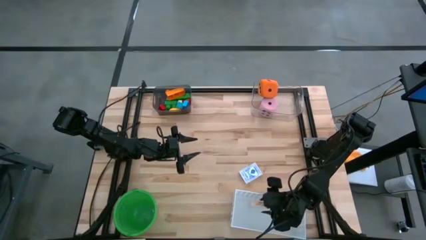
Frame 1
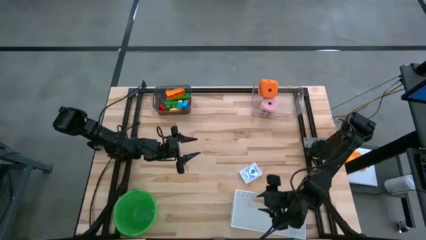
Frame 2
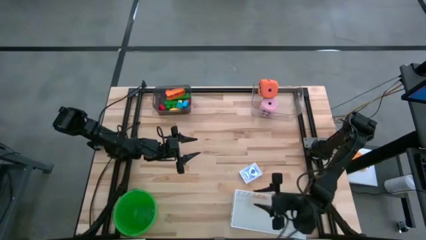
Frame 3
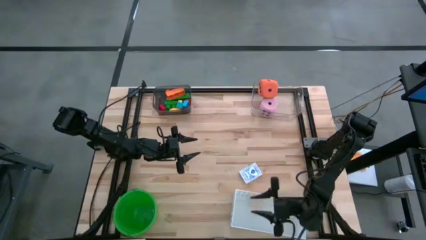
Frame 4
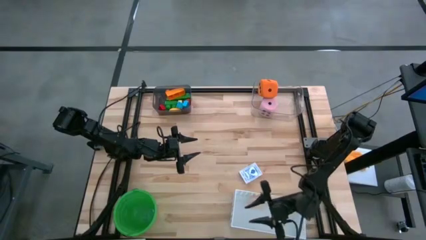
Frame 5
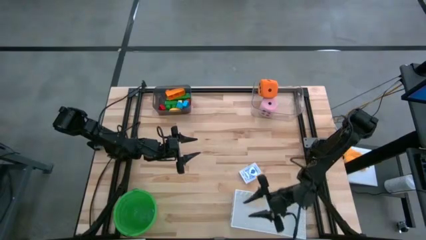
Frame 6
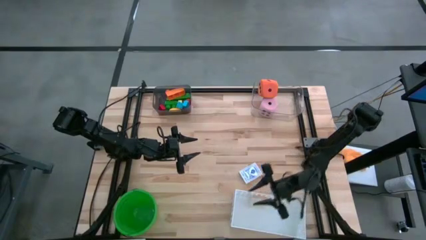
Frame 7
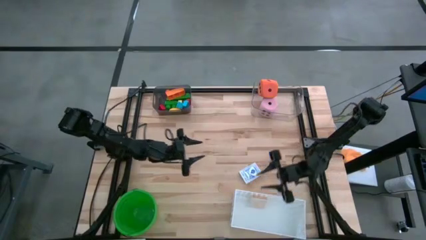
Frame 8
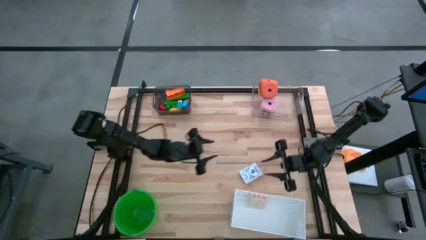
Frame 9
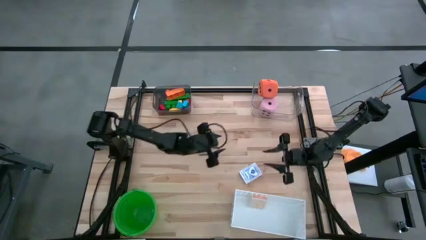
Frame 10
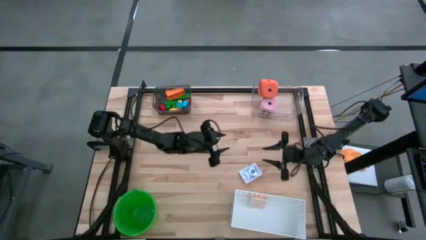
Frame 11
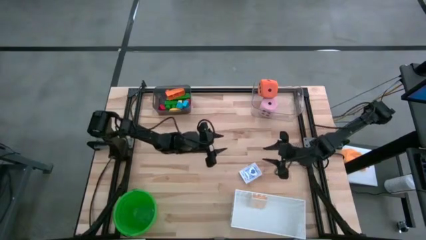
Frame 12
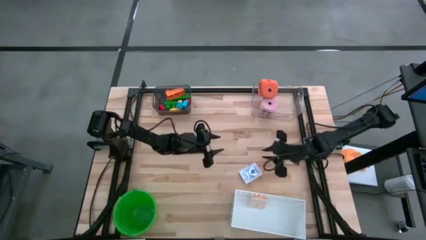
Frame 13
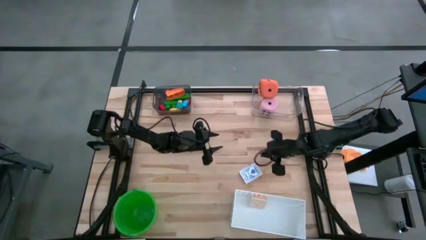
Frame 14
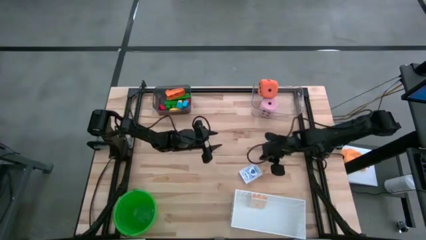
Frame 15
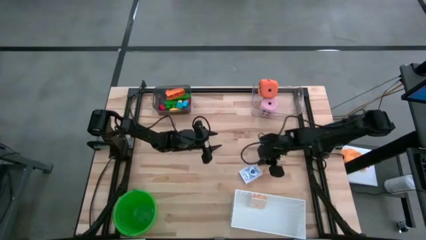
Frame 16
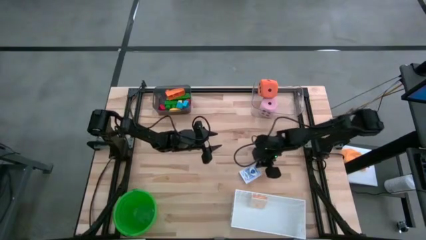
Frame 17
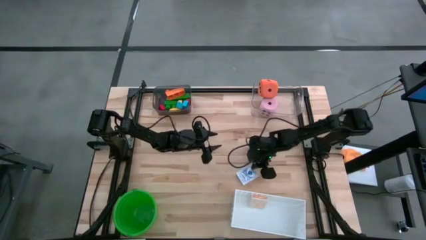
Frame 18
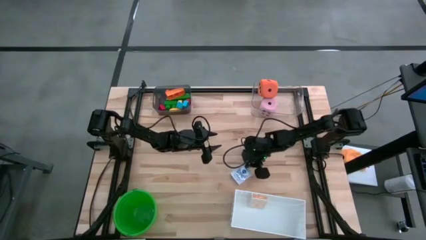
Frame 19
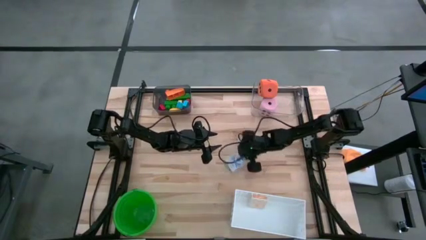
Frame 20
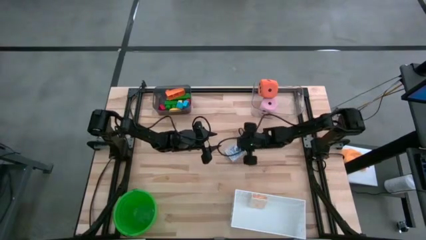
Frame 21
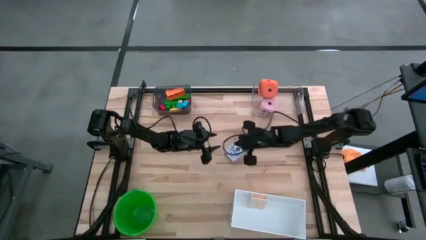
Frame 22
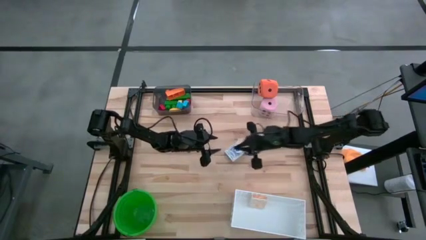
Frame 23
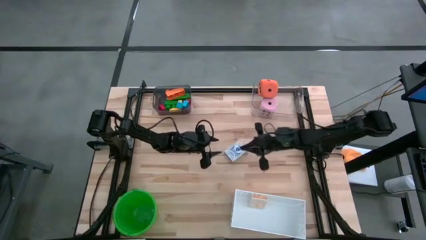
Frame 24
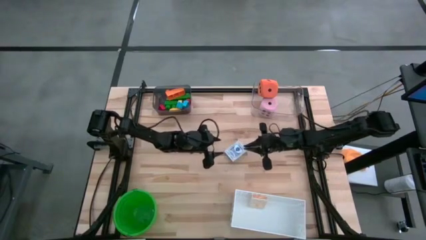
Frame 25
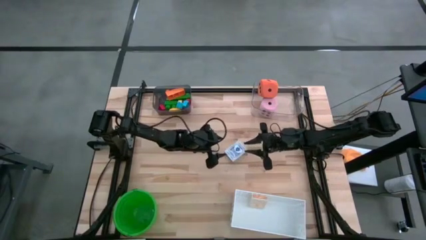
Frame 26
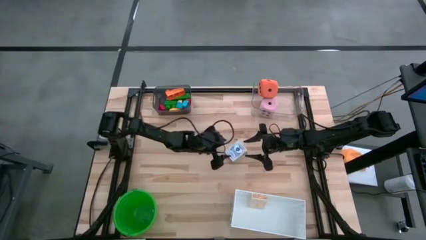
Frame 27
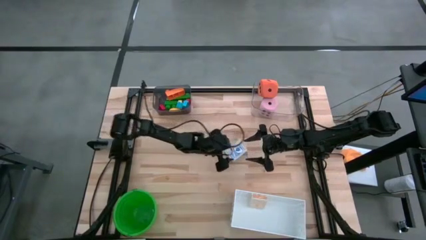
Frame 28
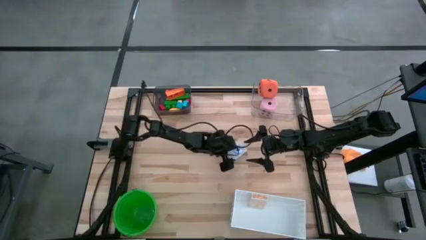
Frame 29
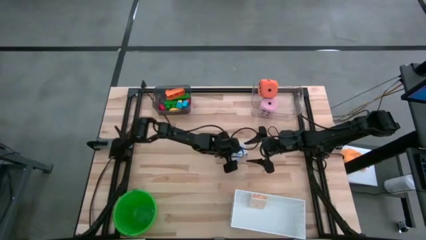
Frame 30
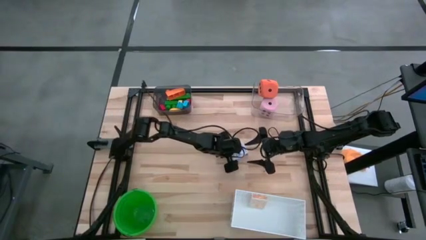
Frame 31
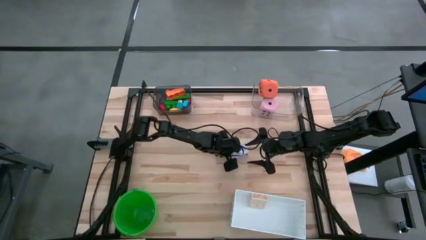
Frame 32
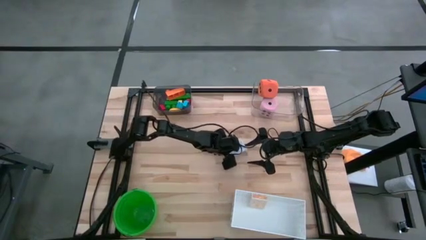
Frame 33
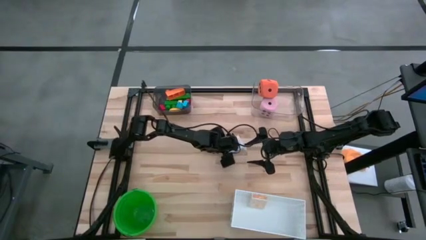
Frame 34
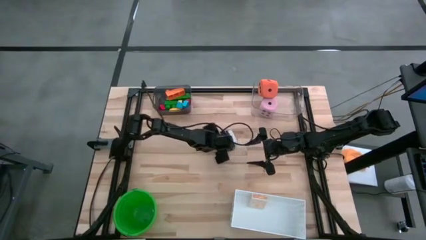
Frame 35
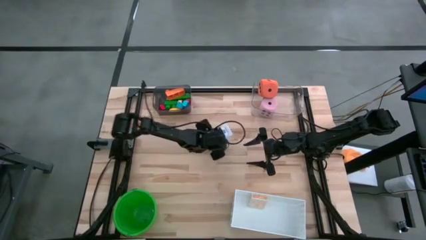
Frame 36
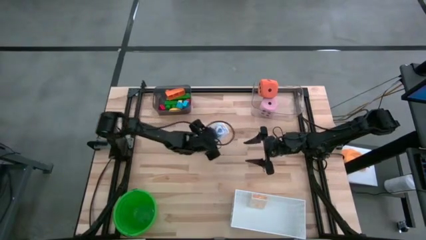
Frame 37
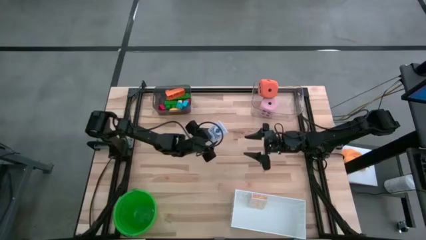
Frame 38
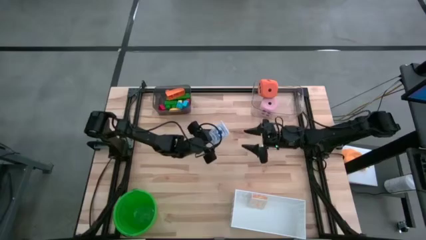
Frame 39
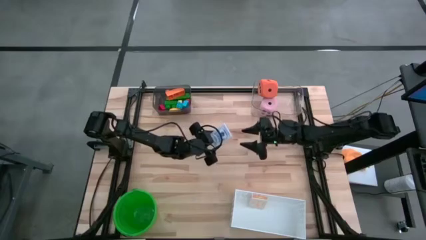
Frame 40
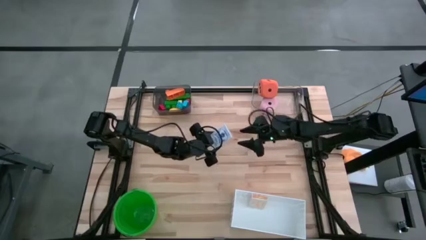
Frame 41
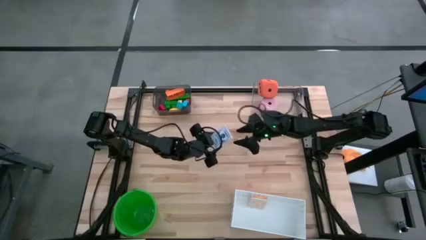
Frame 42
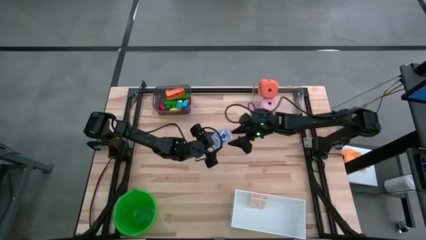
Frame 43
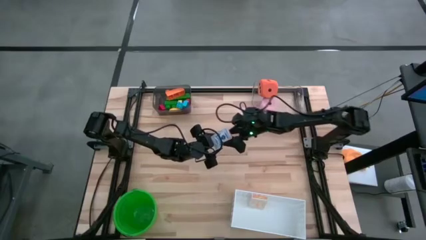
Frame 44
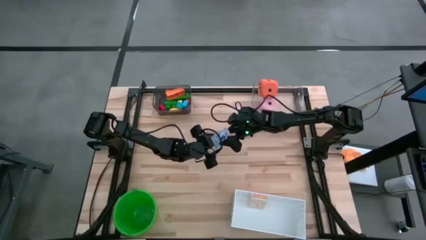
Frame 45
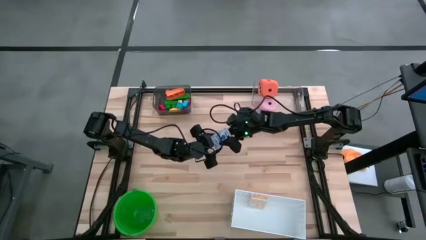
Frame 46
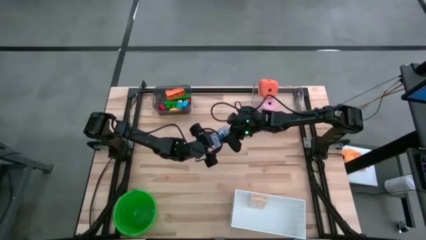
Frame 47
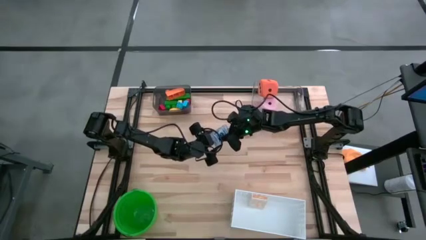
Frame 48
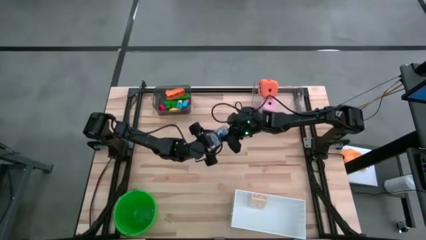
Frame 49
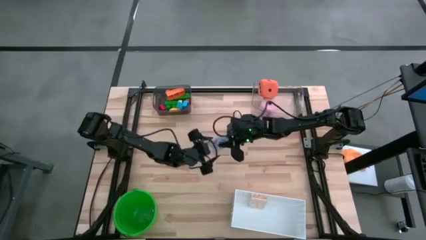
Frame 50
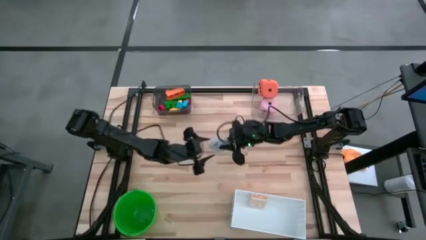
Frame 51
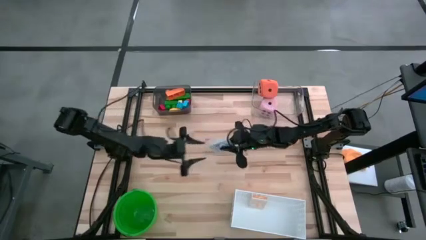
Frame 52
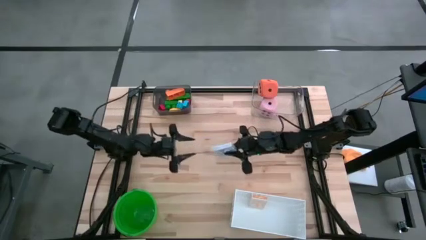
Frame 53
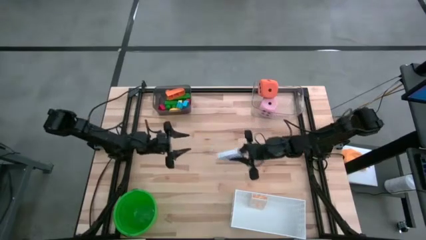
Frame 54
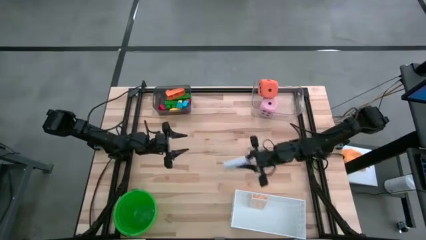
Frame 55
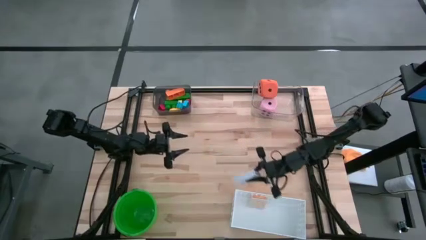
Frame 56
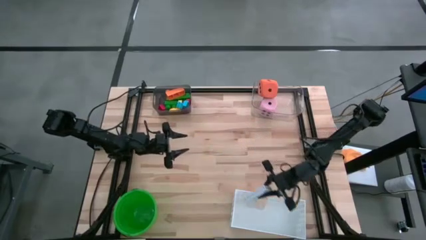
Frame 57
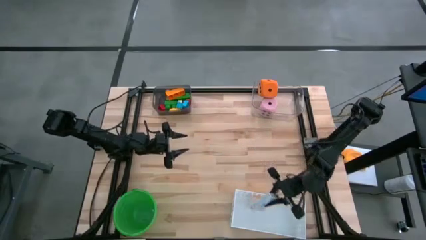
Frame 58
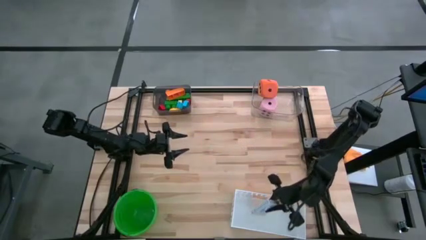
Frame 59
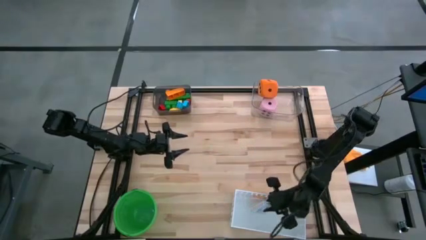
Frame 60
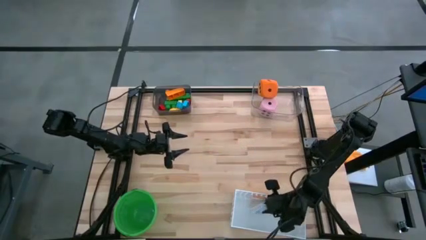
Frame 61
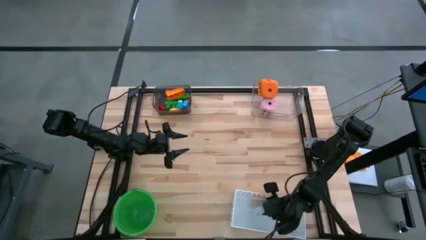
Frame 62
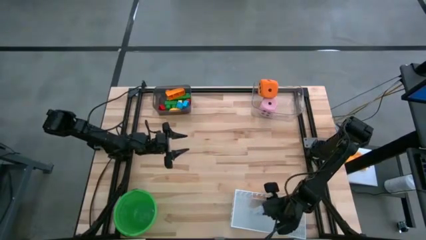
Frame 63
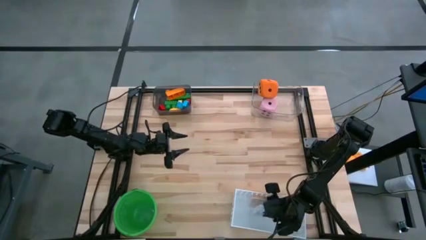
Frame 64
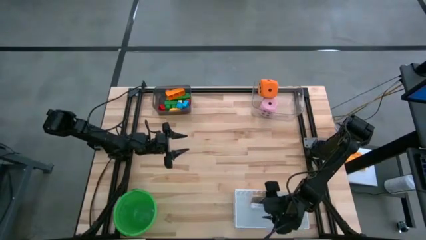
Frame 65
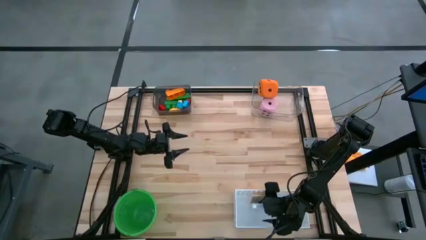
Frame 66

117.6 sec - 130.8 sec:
Task: Pick & Place Toys
Put the blue deck of cards into the white bin

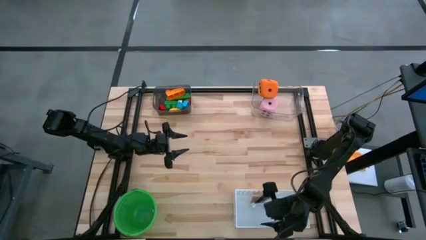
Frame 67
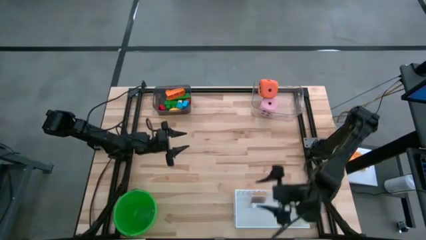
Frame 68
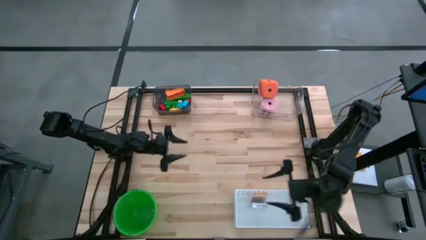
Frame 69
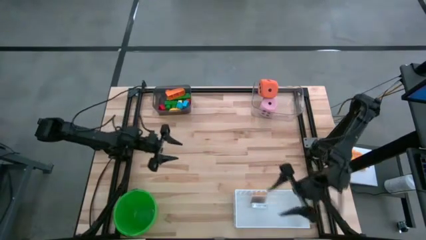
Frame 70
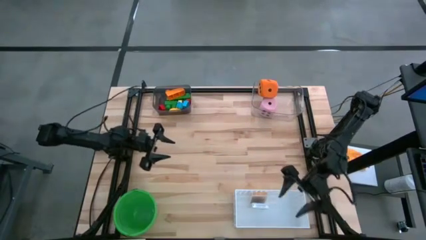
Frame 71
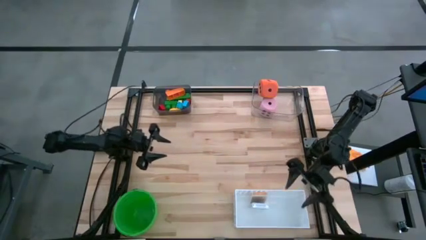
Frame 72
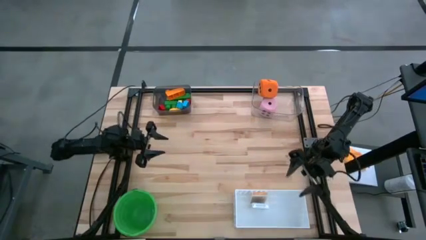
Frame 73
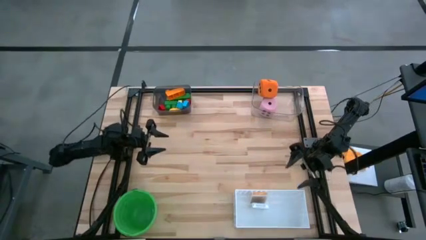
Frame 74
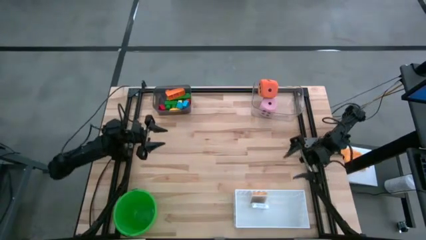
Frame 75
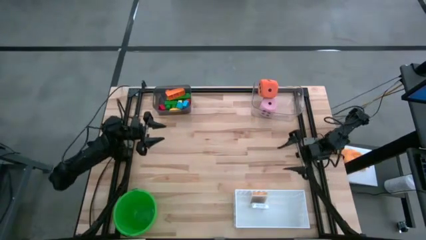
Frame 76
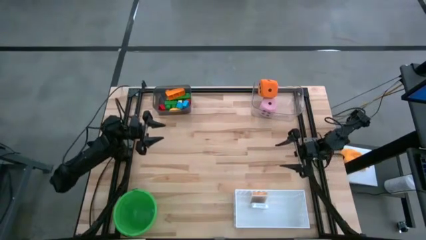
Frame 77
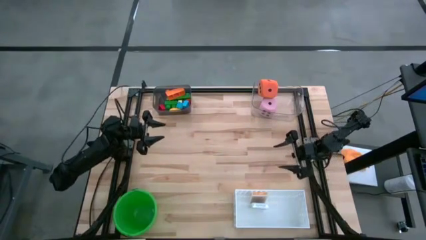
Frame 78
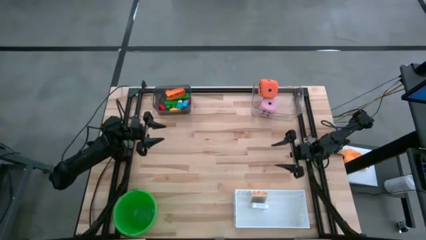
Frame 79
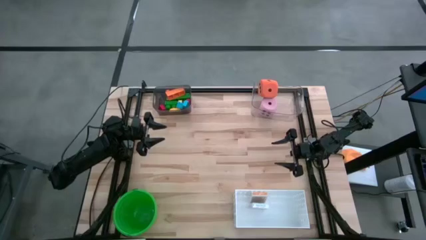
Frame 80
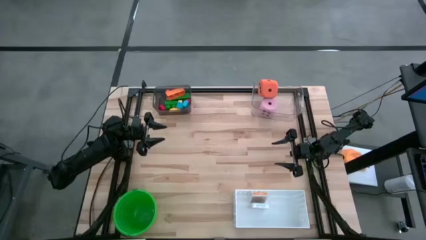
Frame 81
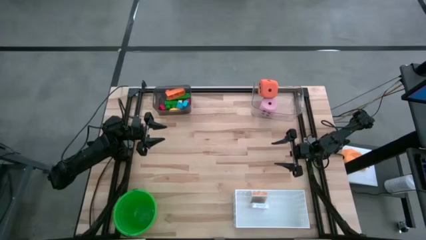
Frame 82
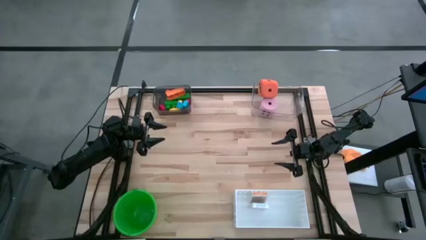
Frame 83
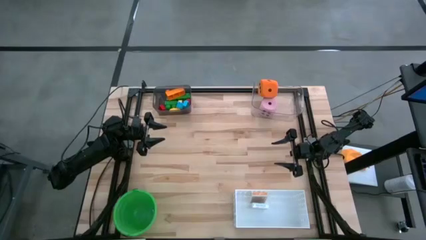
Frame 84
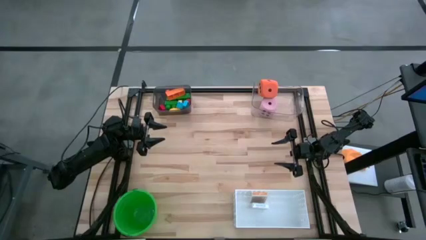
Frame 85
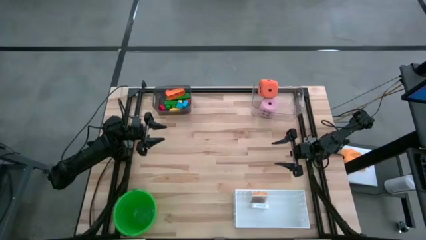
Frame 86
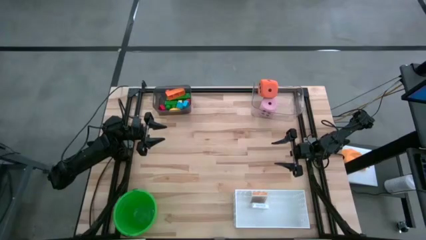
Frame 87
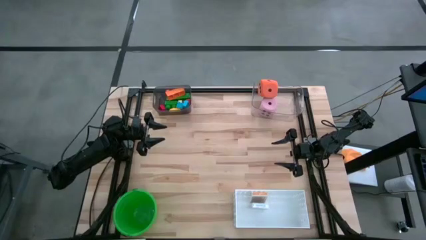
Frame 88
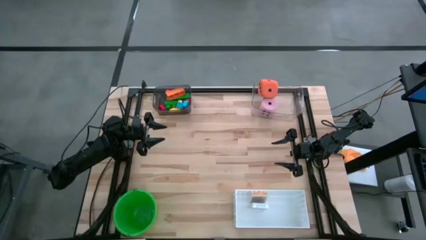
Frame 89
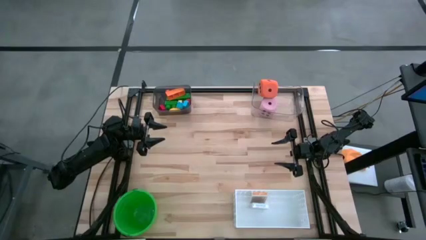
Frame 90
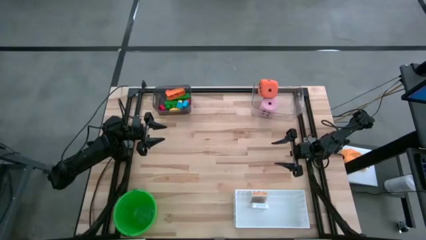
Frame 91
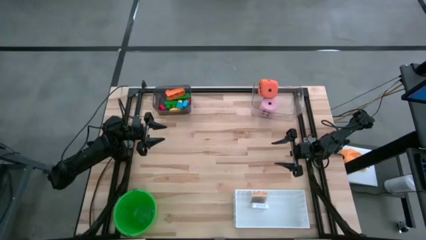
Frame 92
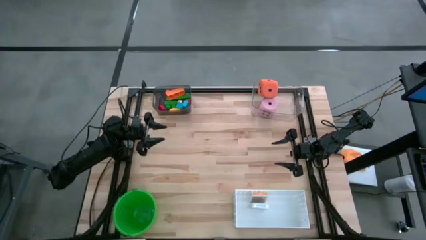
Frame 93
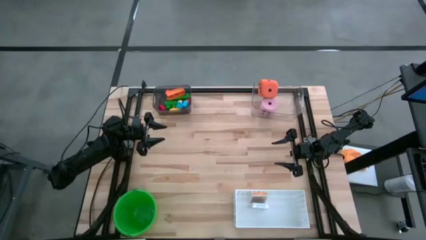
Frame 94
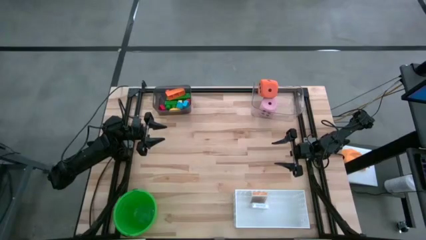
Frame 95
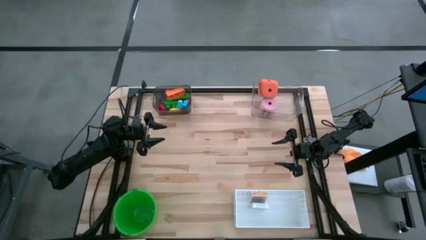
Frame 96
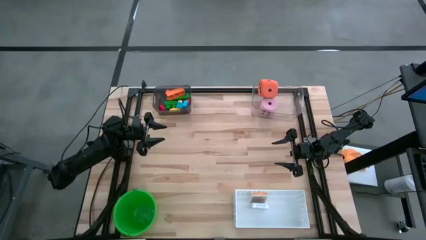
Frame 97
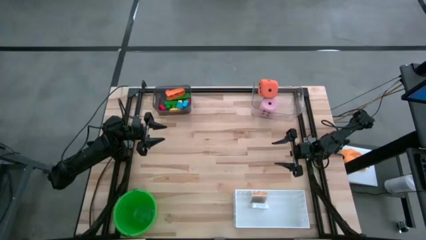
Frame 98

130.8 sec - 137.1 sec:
Return to Home Position
